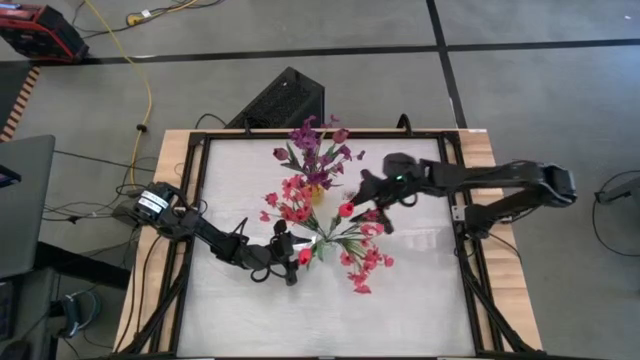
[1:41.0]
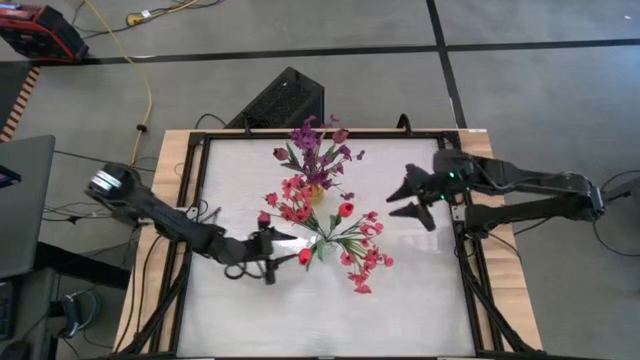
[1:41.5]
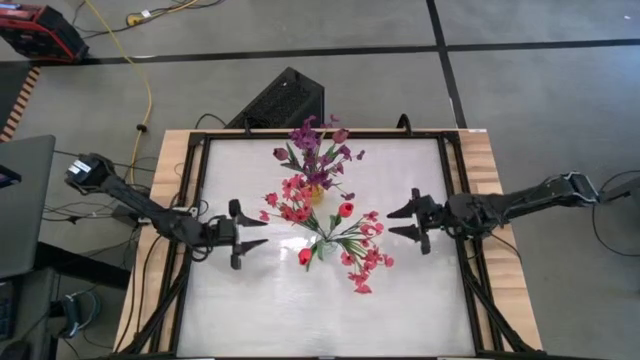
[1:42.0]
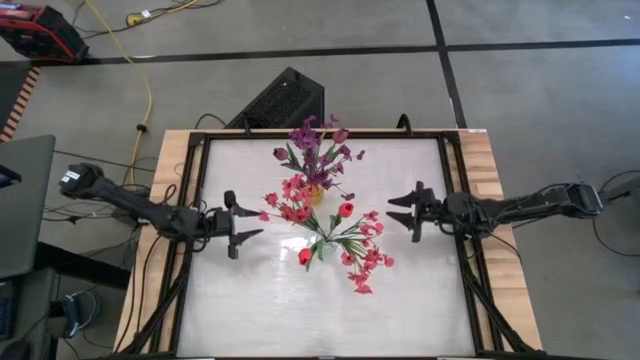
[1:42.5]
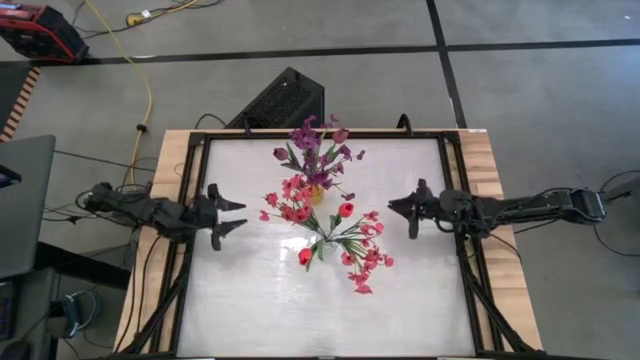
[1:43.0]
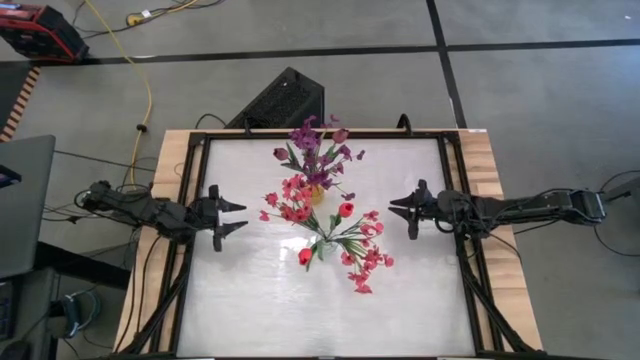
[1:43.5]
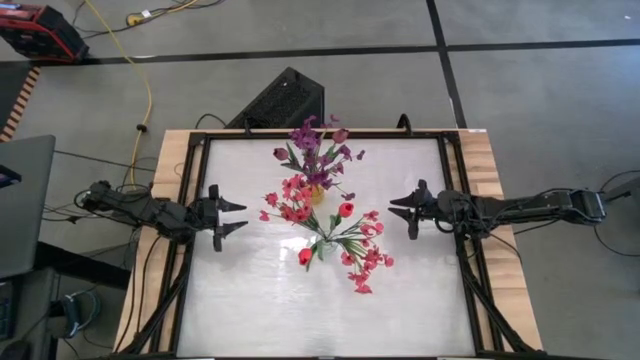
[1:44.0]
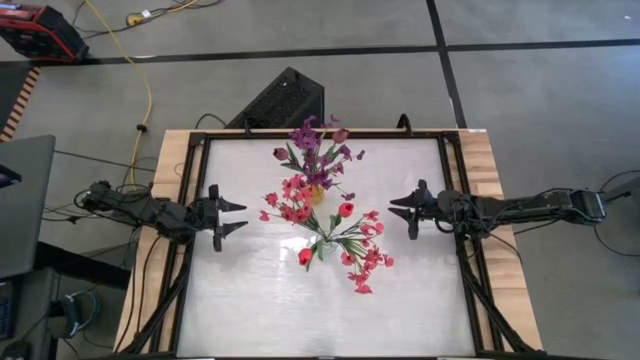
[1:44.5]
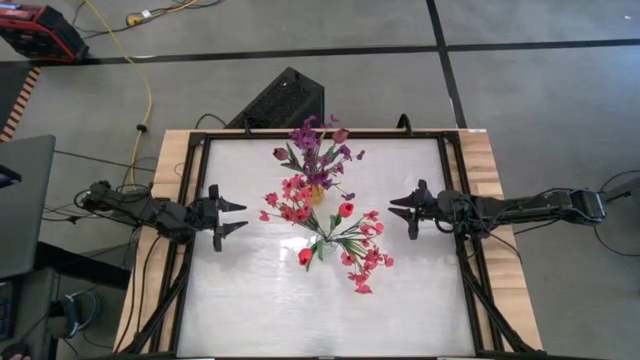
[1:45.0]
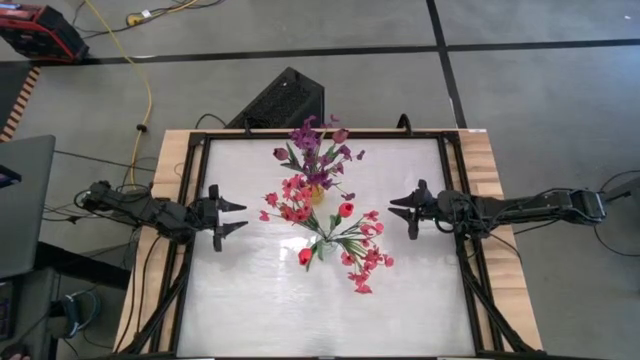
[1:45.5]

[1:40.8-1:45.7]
Task: Sort flowers into vase by color
Return to Home Position

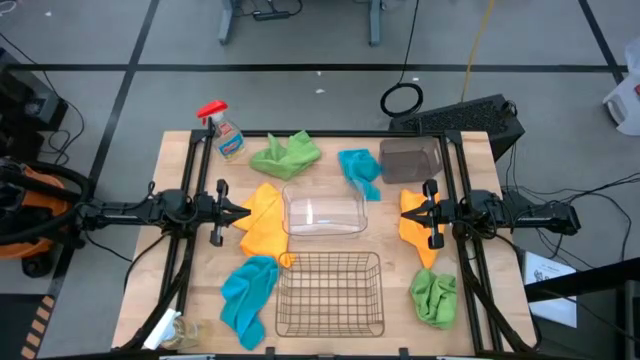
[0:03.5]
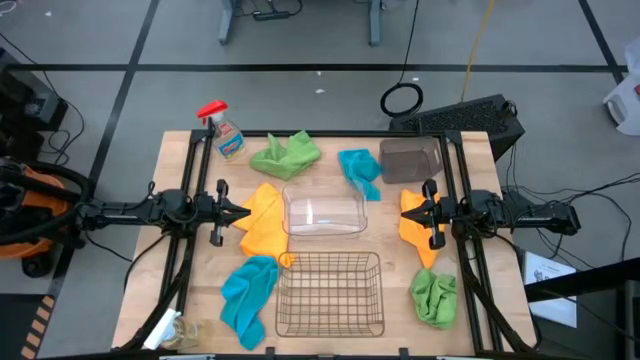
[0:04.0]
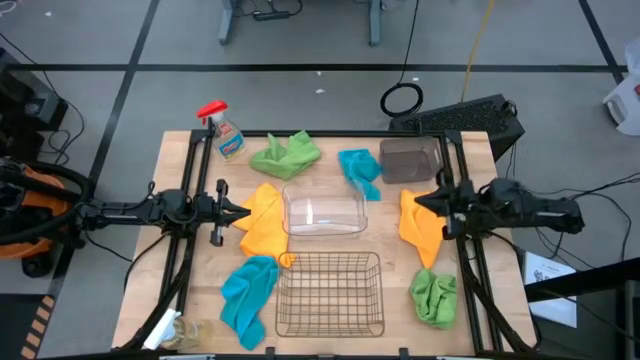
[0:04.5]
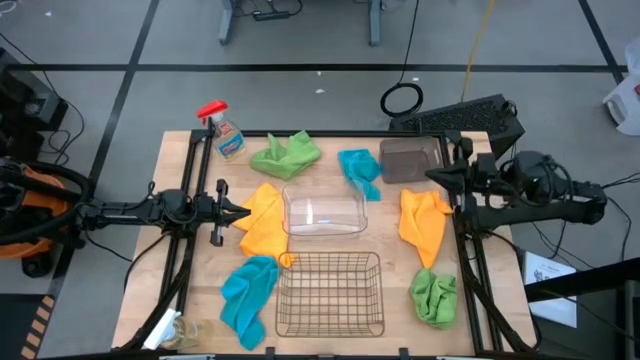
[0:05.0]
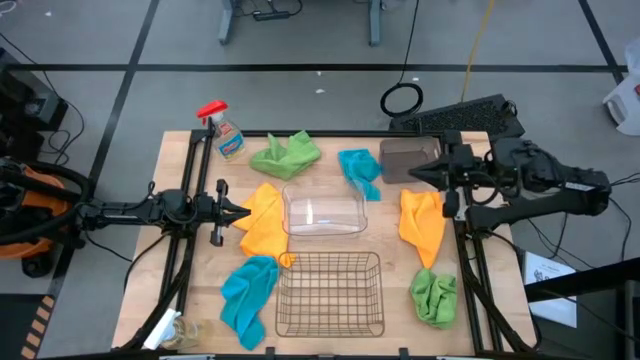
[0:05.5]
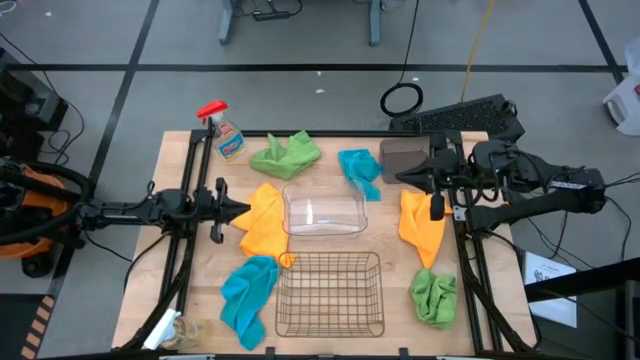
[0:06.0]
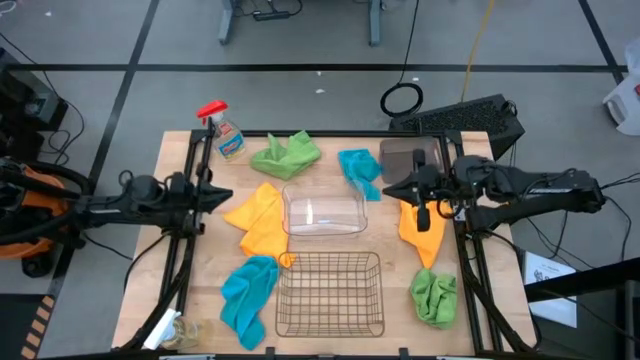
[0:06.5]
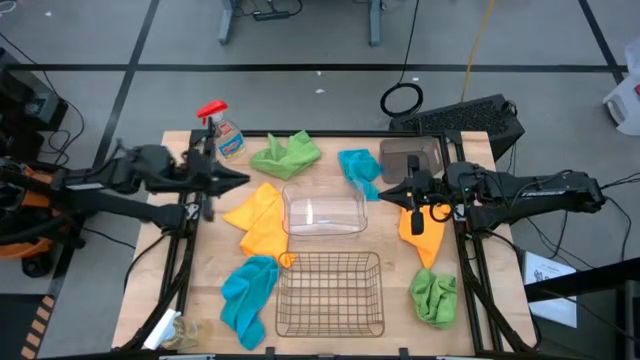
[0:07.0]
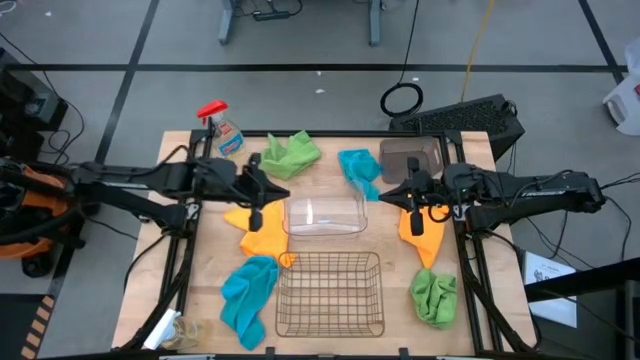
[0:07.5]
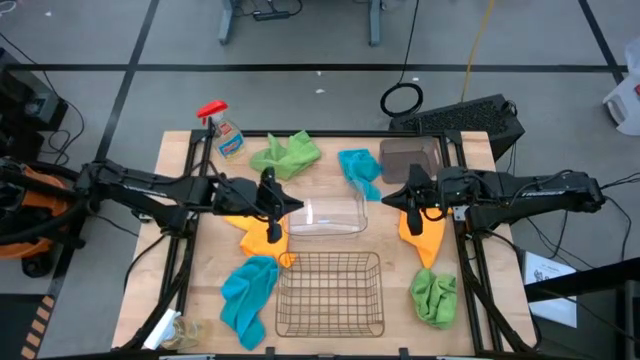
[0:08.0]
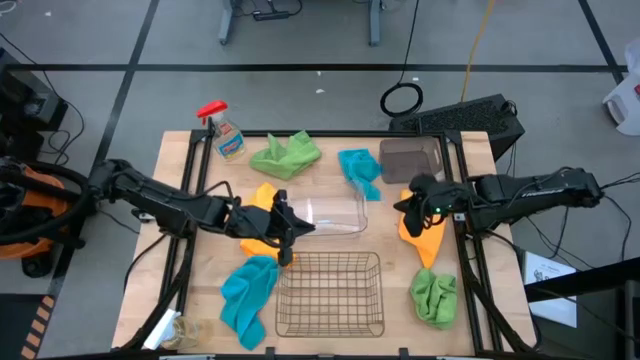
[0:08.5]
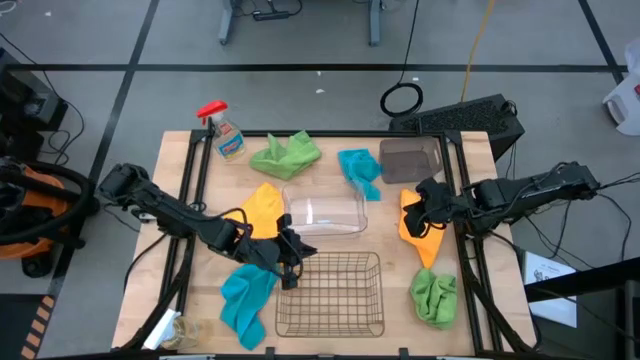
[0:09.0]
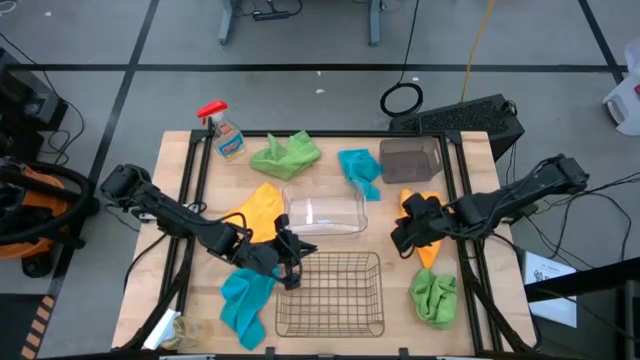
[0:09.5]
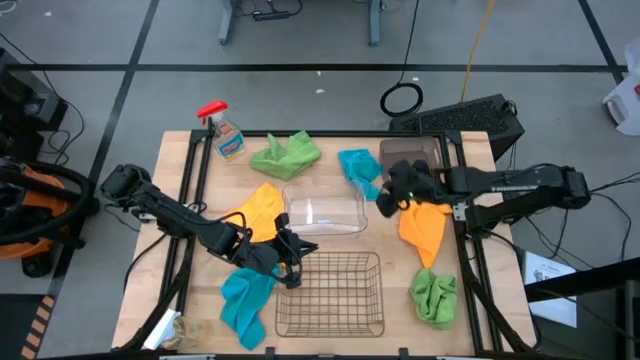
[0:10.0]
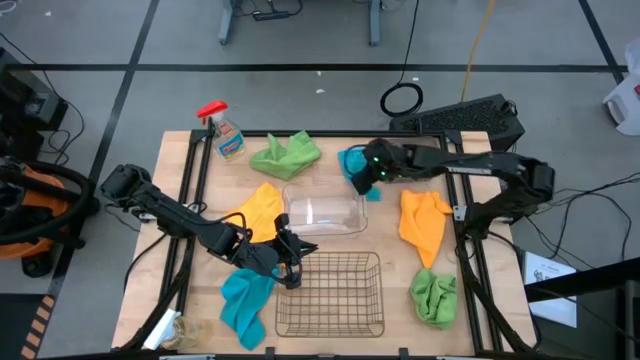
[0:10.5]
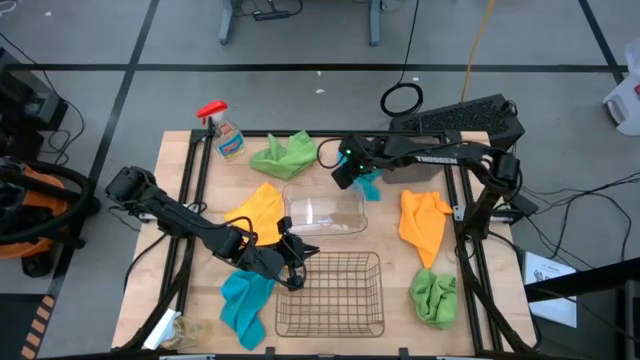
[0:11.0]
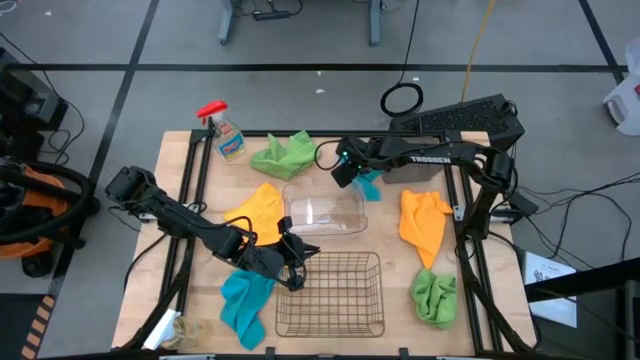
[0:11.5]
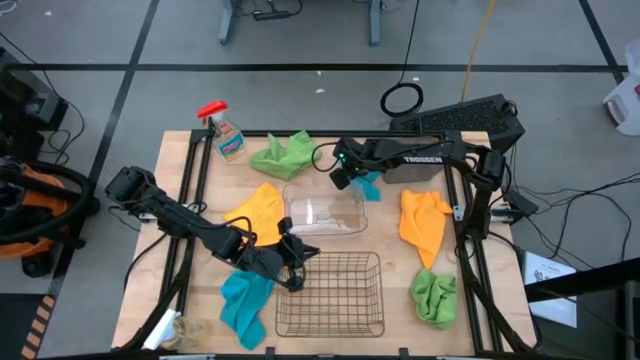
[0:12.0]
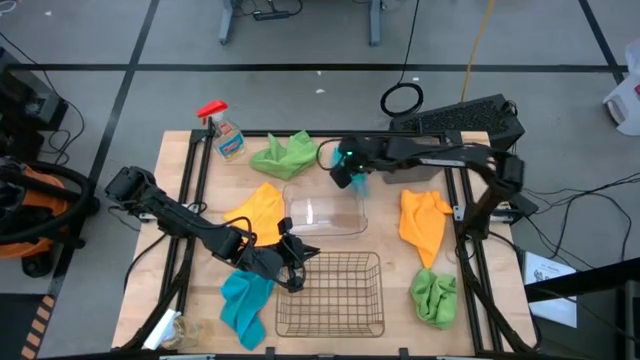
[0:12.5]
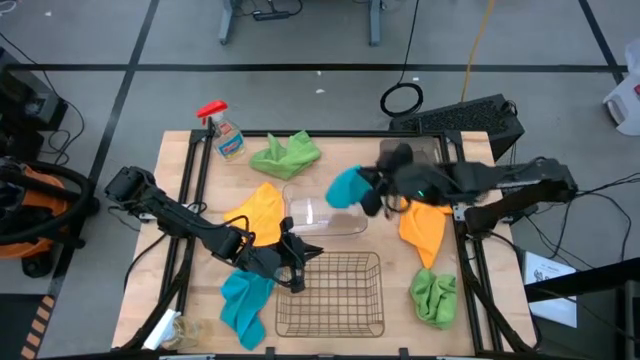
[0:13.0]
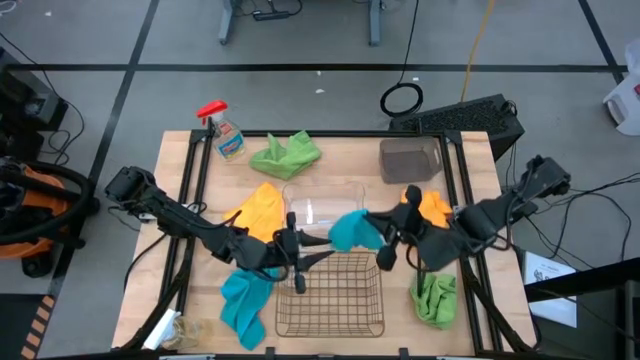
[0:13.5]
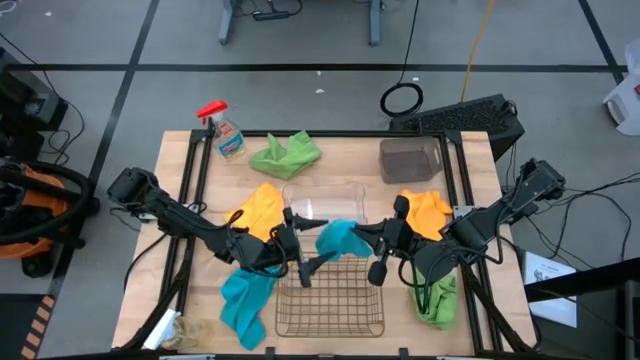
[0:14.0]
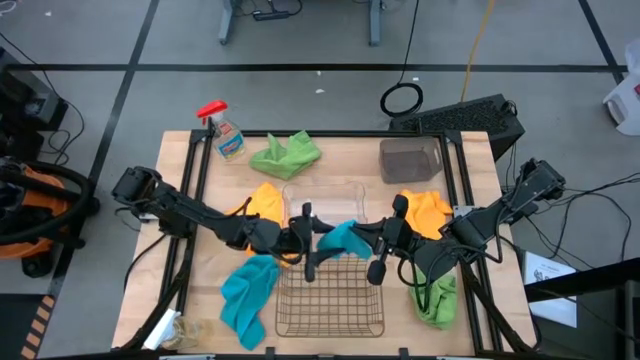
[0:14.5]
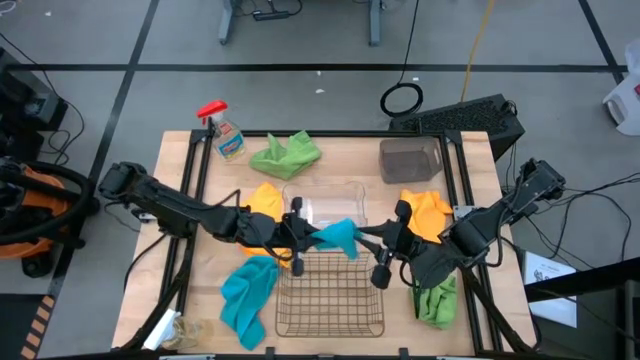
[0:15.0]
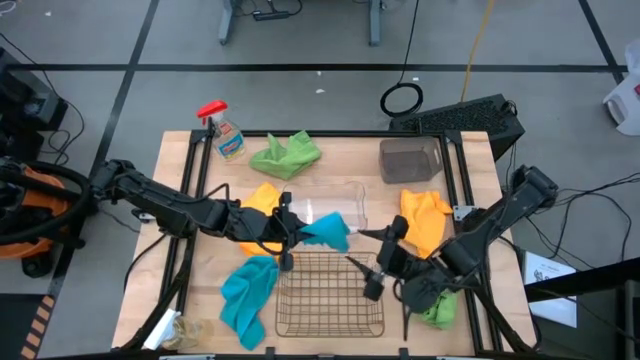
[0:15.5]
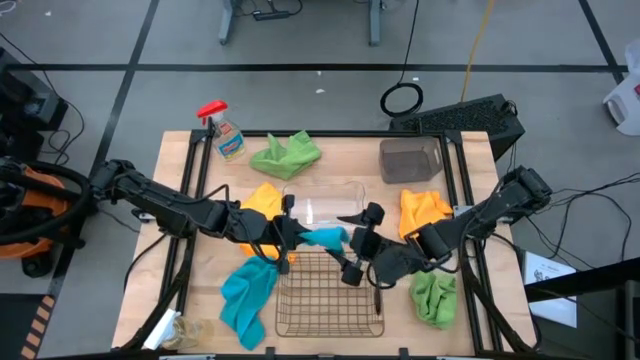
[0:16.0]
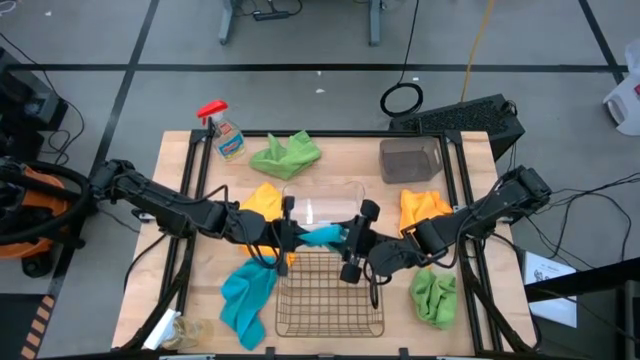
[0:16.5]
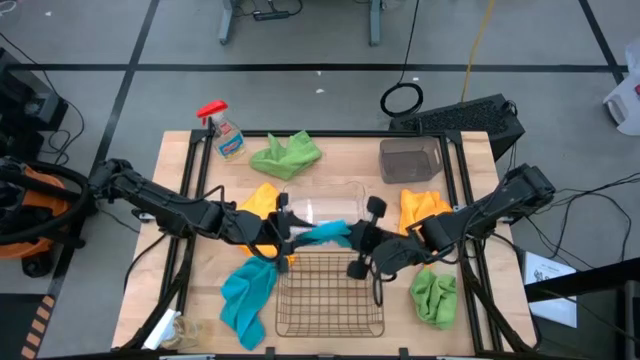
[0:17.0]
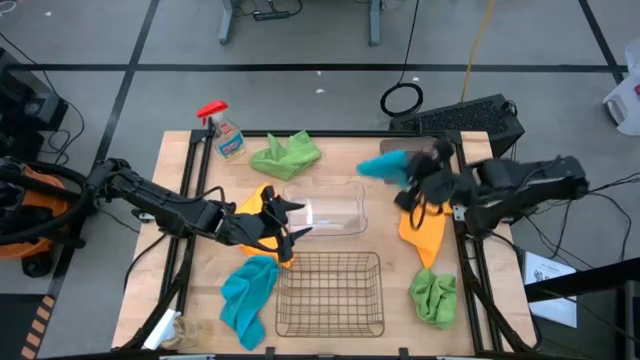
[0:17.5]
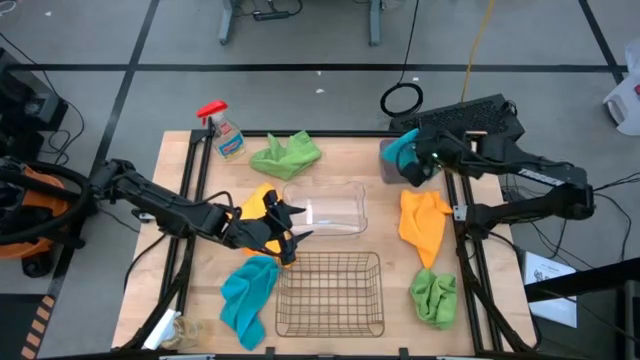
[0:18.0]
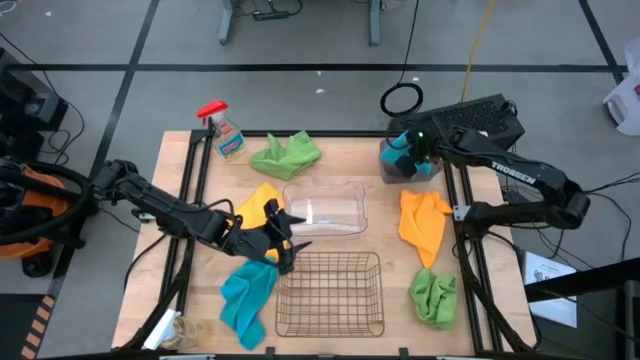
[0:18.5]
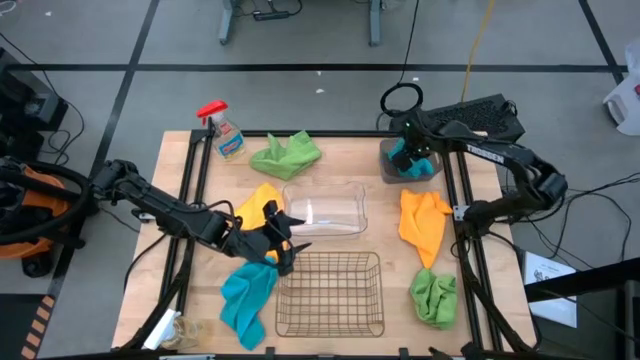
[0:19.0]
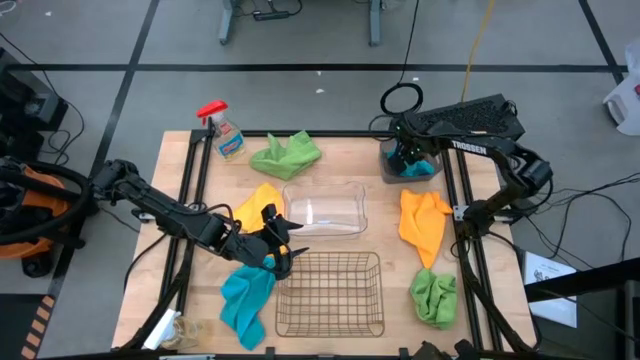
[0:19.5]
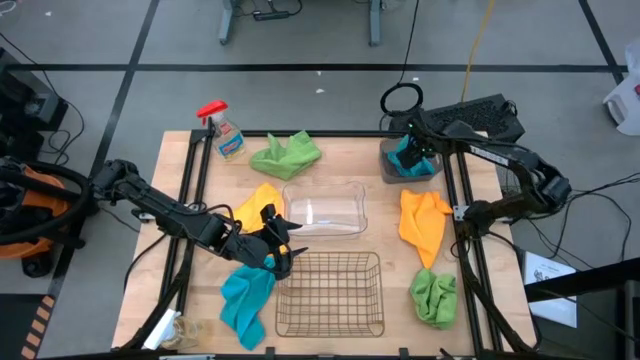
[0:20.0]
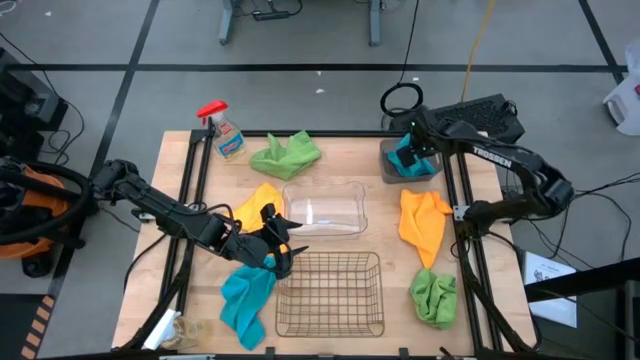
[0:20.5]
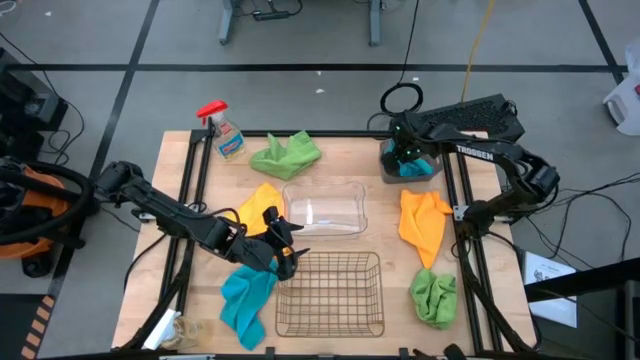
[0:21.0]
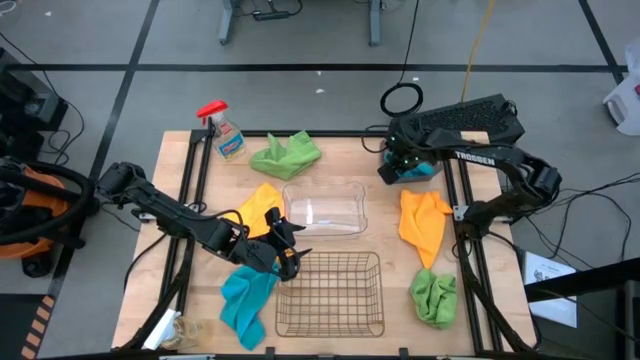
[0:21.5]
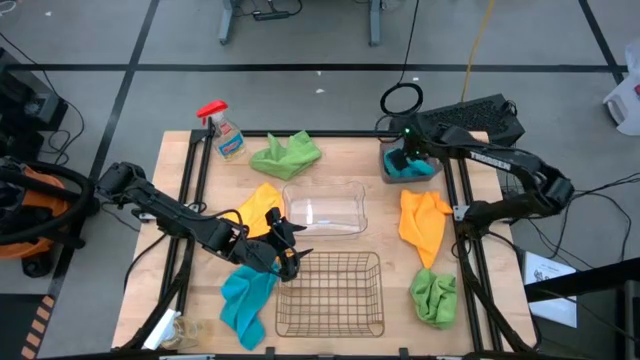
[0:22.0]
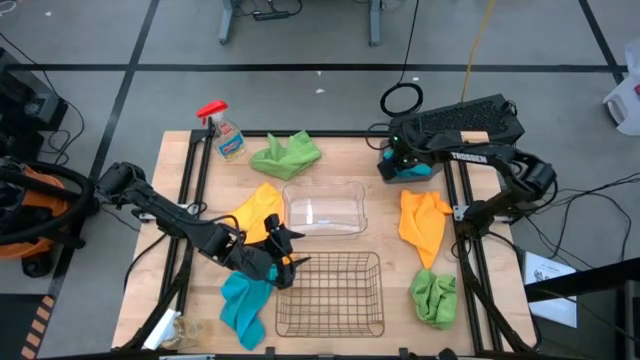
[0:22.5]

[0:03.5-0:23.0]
Task: Sort microfiber towel by color & place in baskets
Put the top blue microfiber cloth into the transparent black bin
